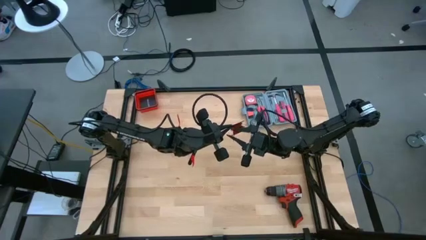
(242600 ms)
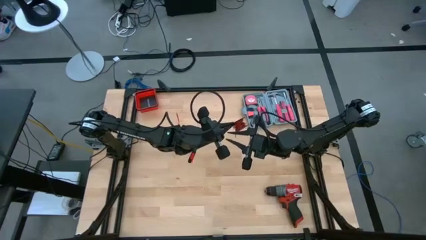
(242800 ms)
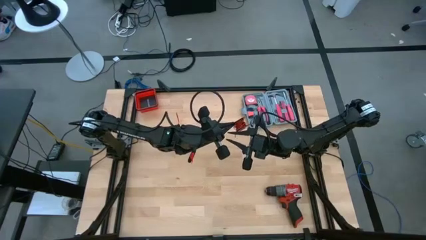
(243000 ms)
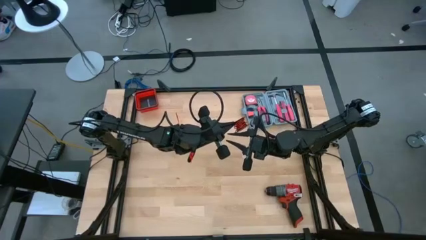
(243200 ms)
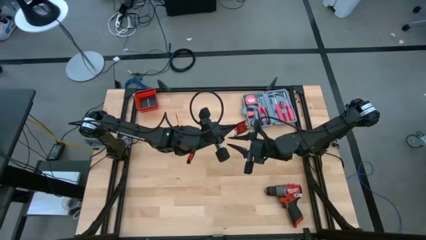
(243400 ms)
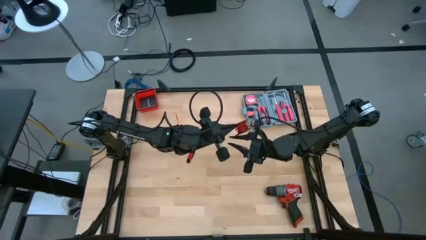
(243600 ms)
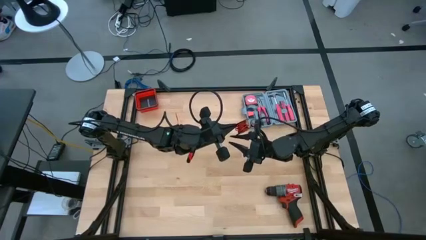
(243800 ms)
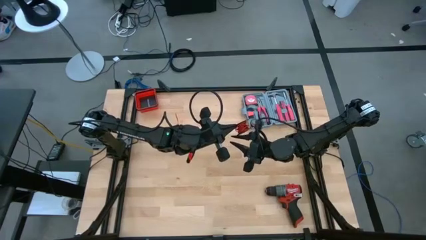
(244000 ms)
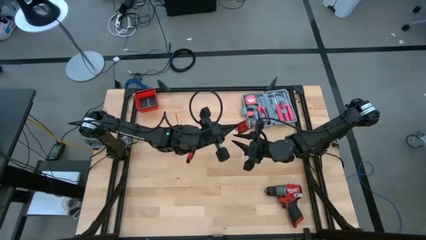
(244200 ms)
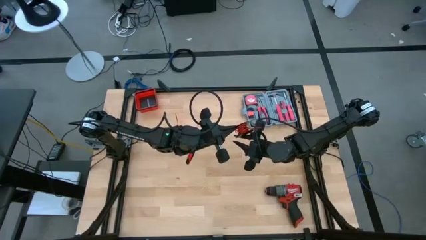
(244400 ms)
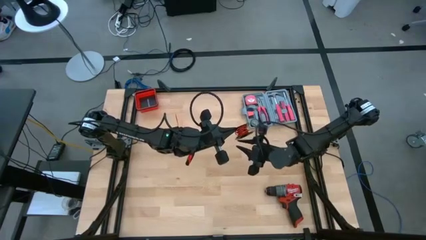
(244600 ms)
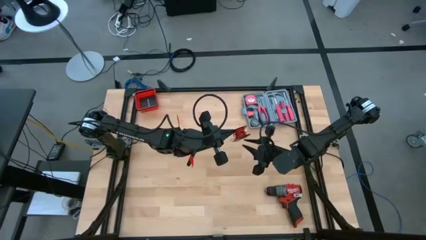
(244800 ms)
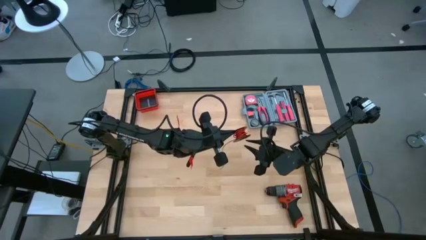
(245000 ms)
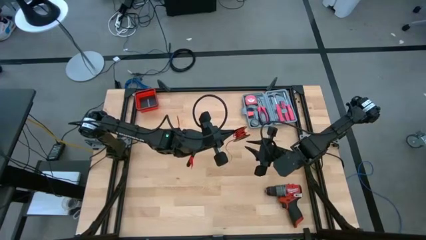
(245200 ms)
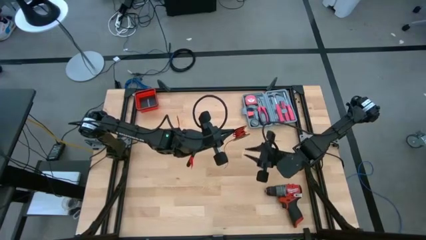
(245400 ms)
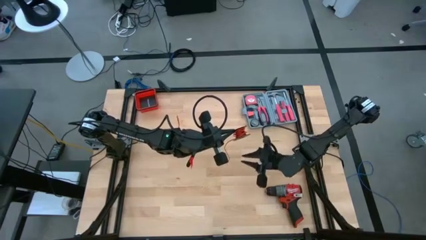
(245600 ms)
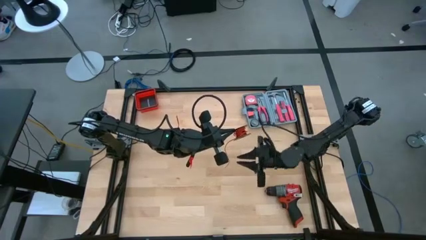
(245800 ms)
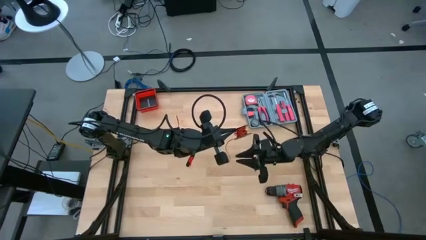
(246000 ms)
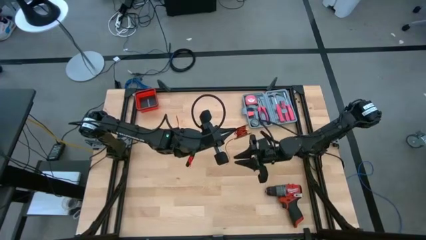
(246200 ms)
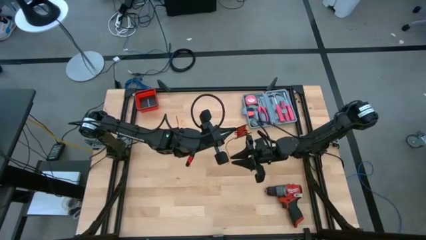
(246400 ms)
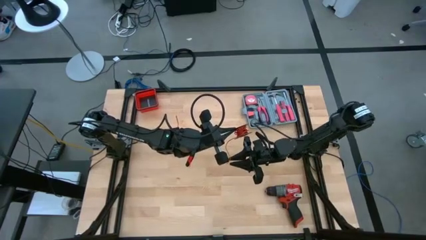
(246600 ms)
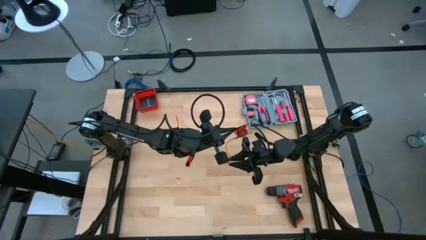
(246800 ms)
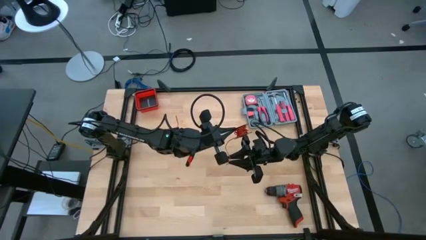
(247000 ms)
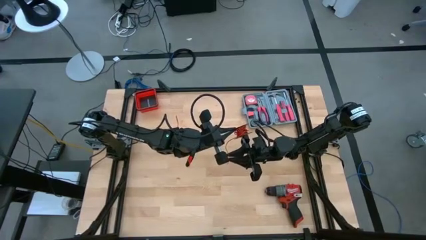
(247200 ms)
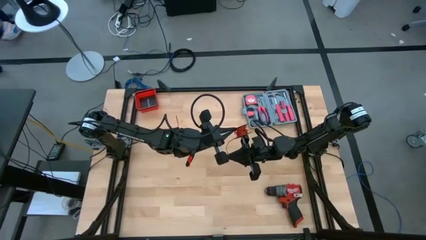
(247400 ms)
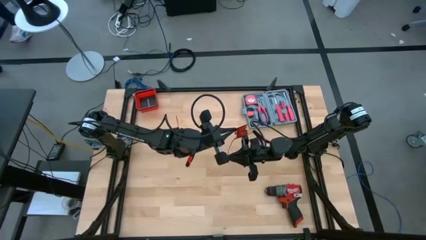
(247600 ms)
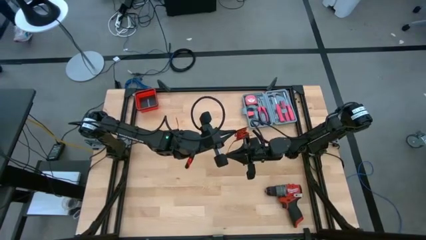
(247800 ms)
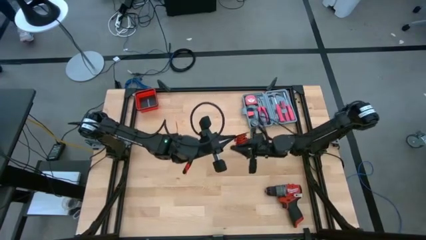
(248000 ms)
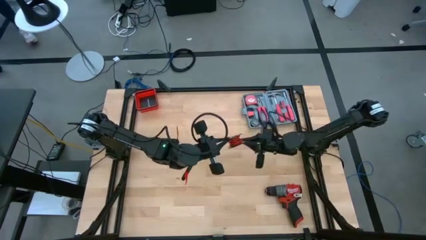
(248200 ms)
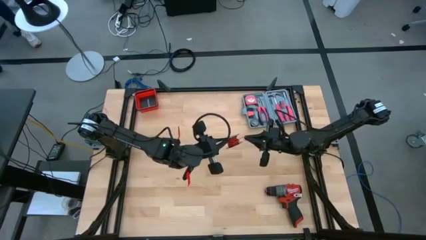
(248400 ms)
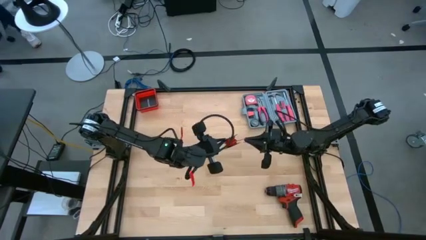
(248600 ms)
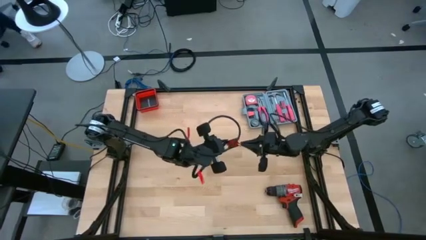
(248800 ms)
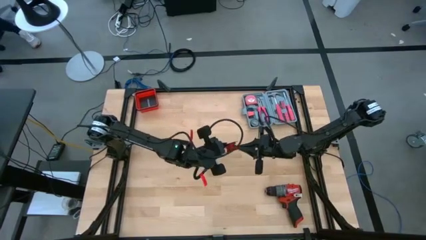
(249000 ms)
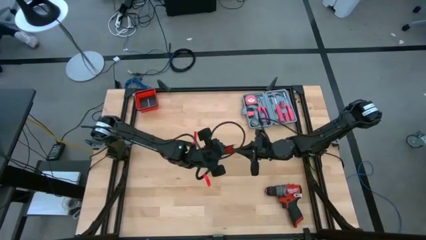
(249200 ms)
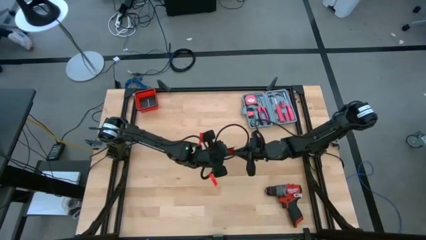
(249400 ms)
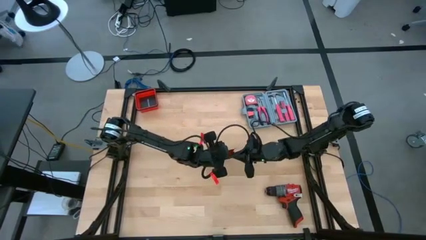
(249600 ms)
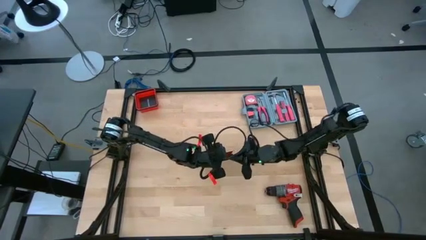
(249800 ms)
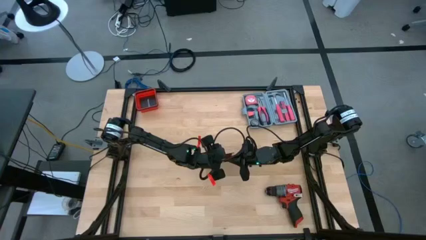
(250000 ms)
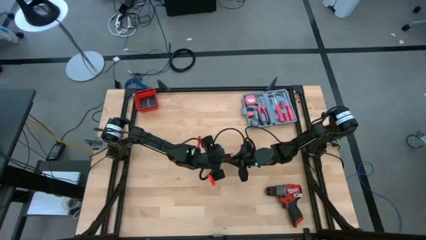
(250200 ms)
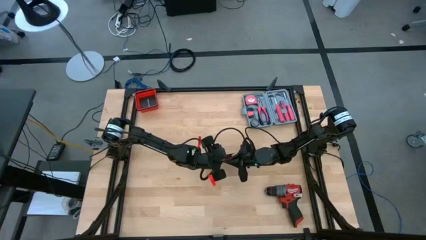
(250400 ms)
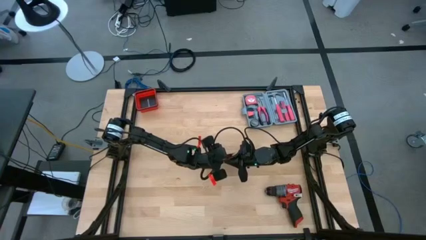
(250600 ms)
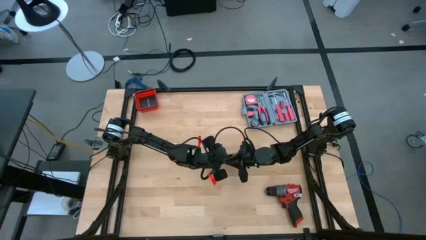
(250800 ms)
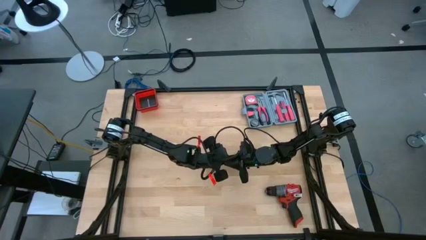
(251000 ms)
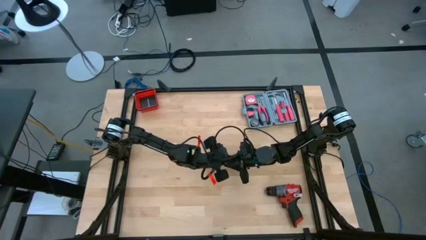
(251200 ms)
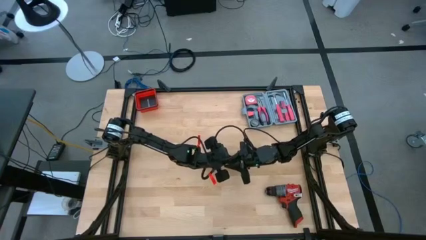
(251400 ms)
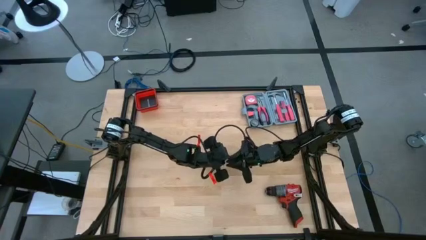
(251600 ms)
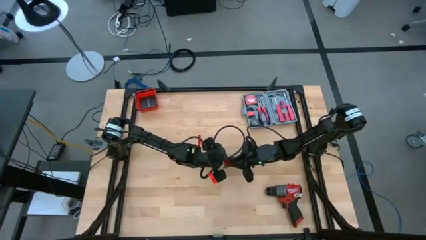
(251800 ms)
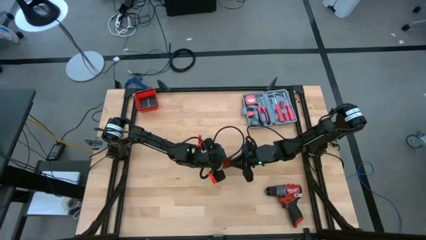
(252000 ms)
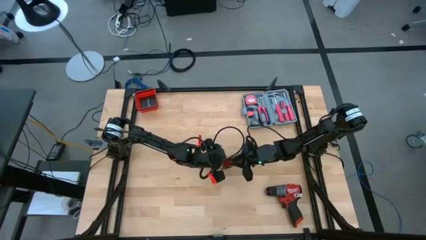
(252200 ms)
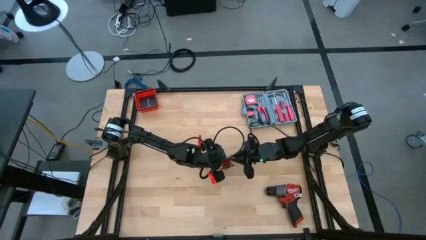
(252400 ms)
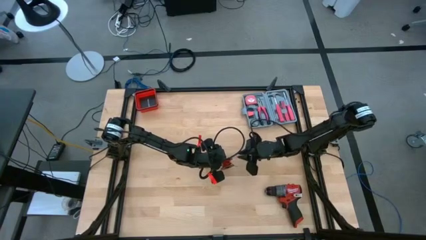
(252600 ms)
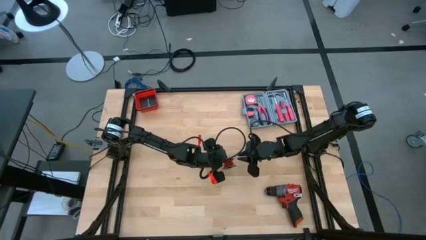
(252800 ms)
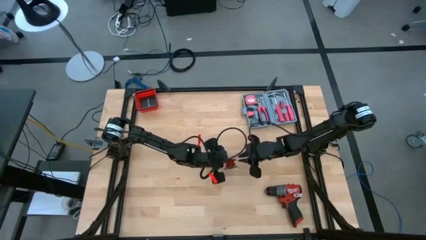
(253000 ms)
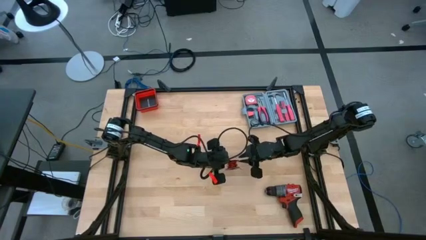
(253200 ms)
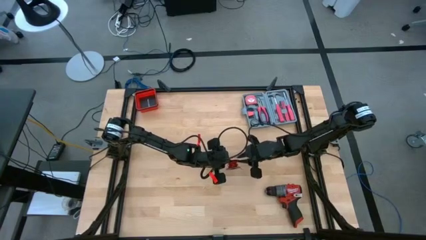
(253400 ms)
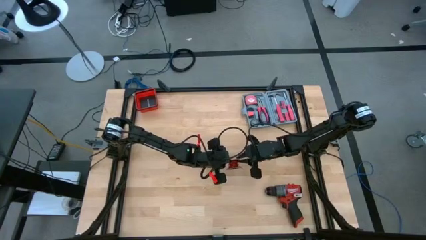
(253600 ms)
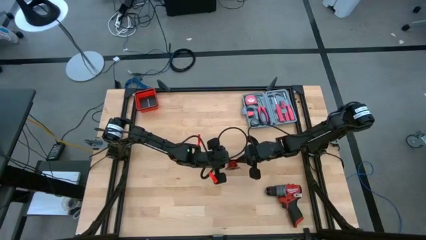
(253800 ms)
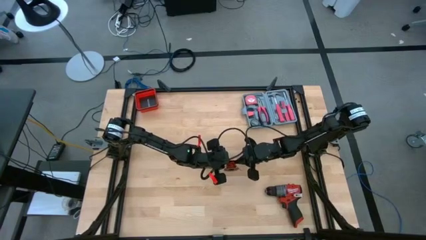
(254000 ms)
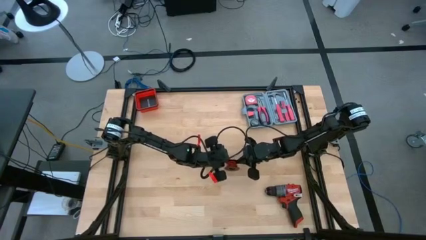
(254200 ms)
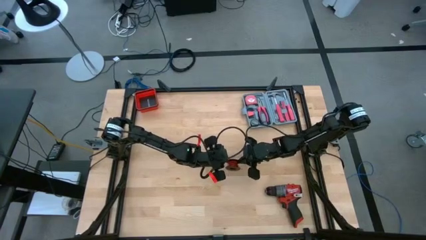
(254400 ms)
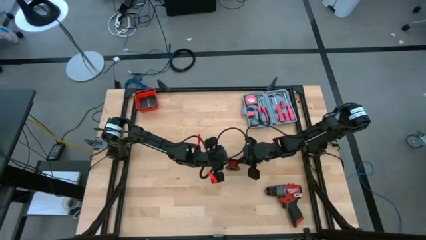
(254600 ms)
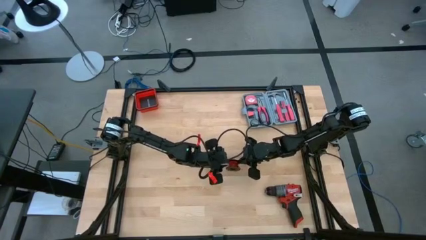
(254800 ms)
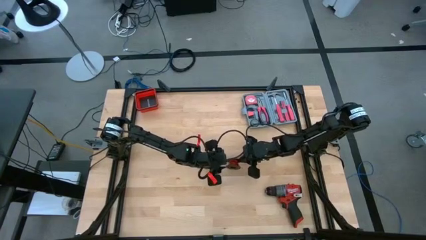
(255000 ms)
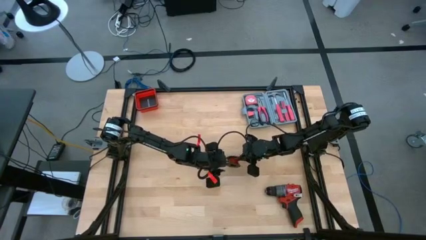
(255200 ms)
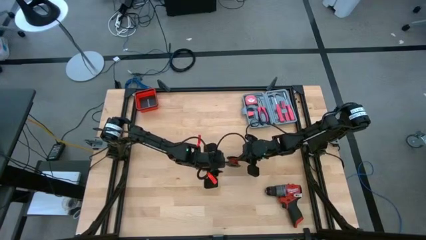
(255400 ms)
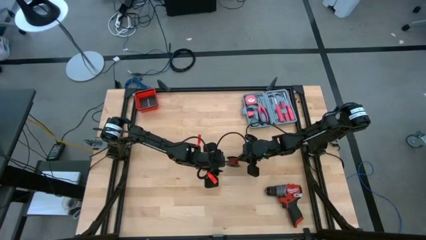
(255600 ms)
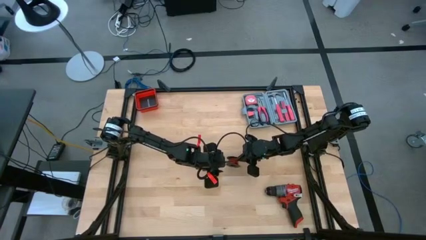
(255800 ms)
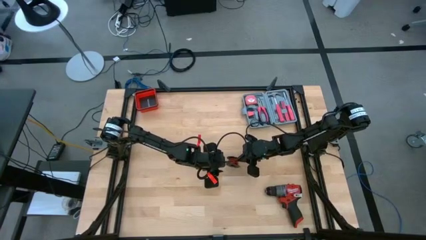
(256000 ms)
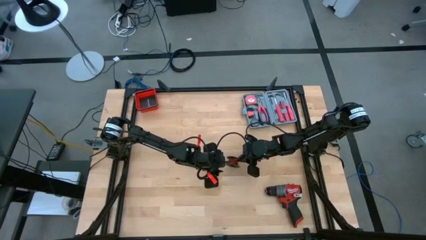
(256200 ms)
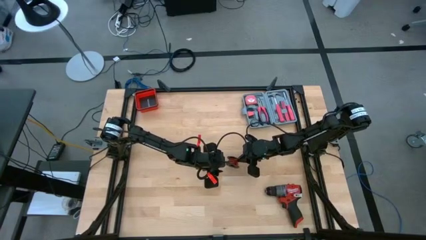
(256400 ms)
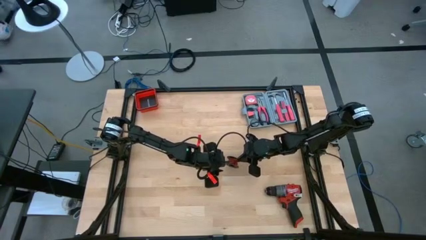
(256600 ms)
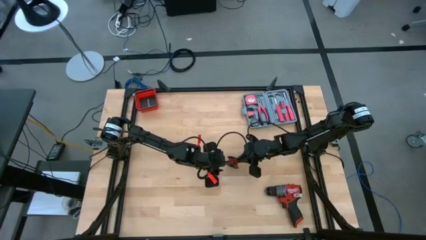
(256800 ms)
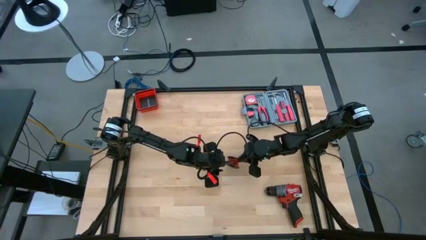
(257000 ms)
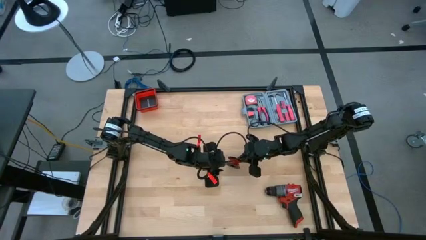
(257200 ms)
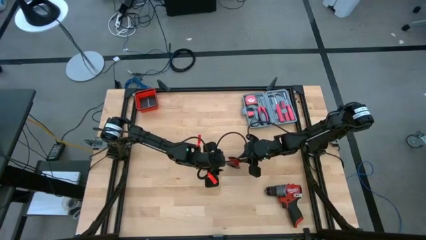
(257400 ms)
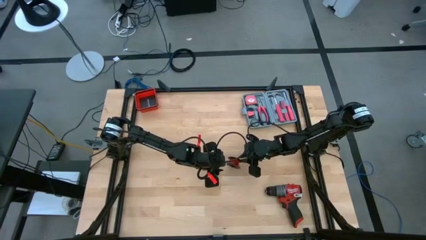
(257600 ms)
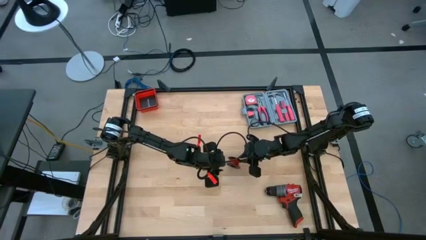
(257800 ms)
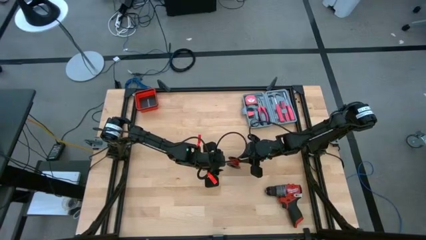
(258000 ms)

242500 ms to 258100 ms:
Task: Coil cords
Coil the red wire onto the black spool

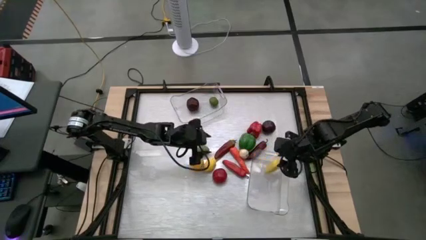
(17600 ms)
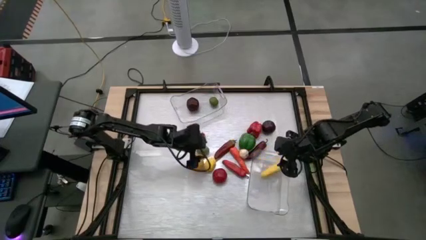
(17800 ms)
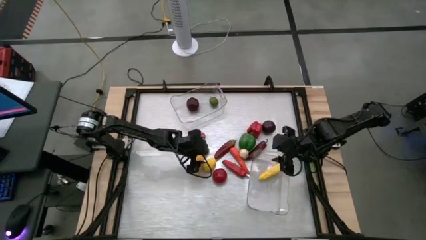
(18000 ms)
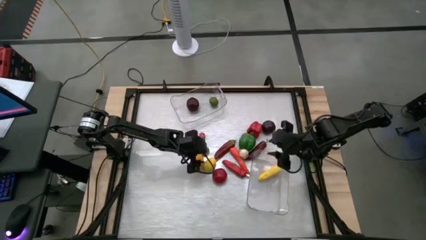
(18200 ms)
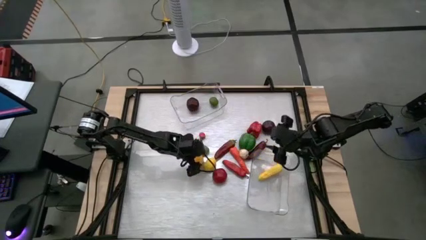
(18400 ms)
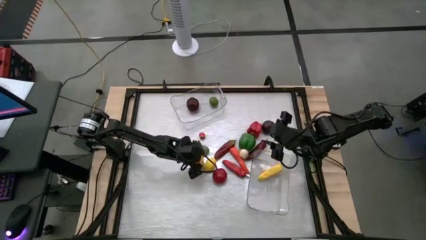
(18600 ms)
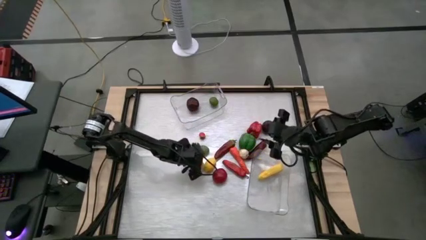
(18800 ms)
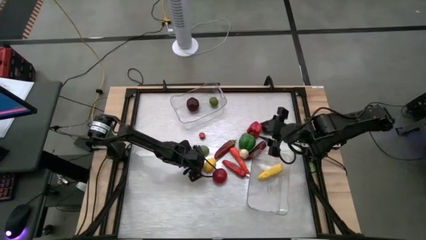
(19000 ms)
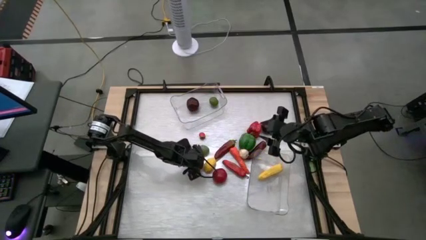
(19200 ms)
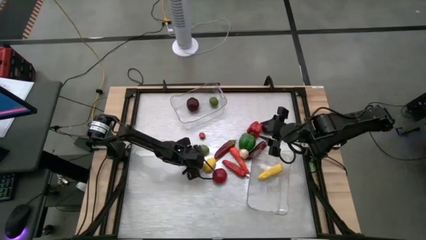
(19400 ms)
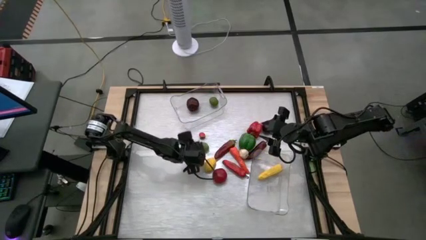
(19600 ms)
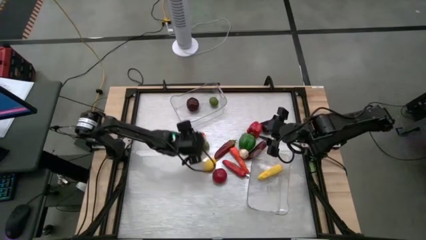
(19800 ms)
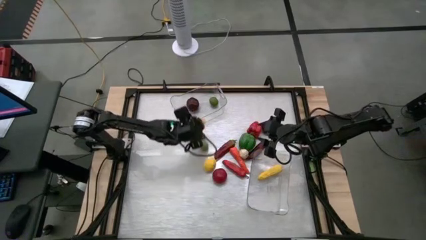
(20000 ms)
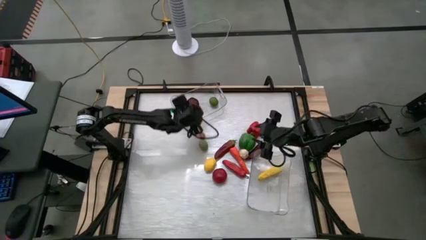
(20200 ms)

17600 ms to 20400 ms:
Task: Sort produce into baskets
Put the left yellow lemon into the top transparent bin
